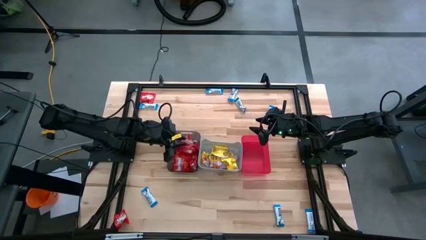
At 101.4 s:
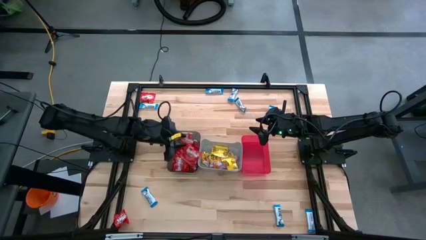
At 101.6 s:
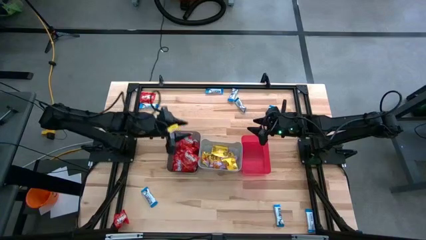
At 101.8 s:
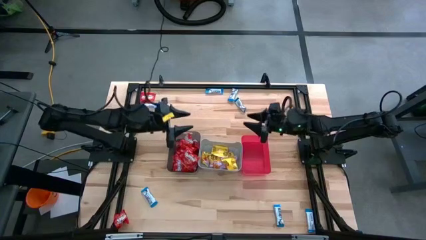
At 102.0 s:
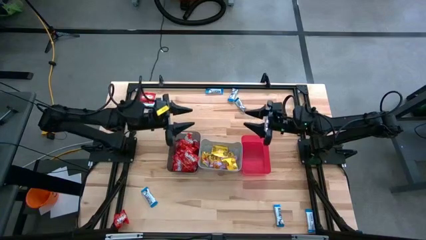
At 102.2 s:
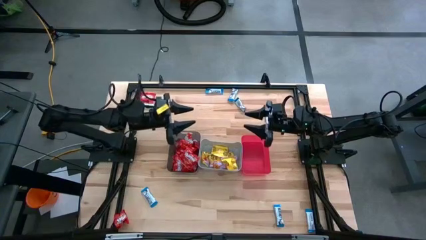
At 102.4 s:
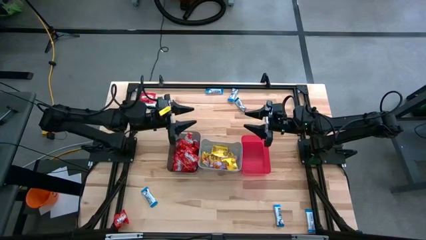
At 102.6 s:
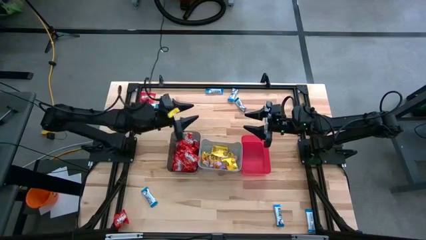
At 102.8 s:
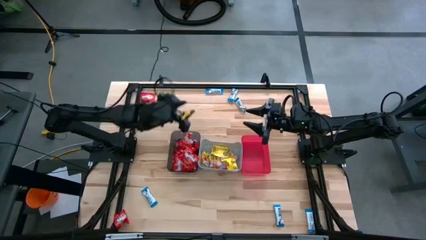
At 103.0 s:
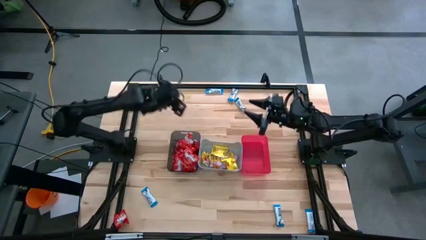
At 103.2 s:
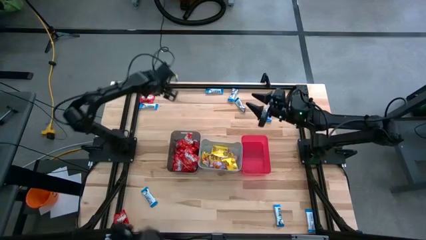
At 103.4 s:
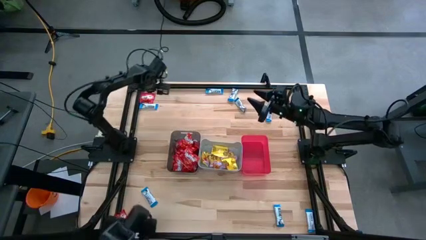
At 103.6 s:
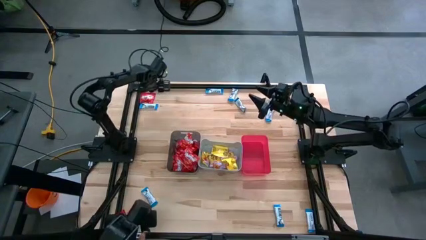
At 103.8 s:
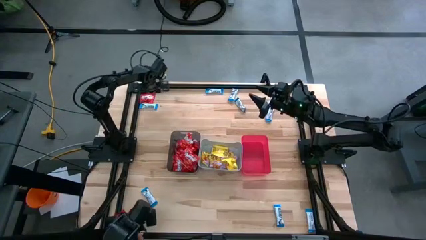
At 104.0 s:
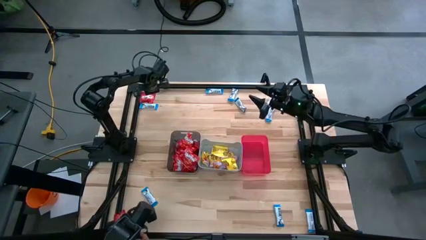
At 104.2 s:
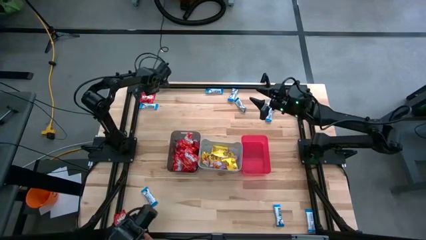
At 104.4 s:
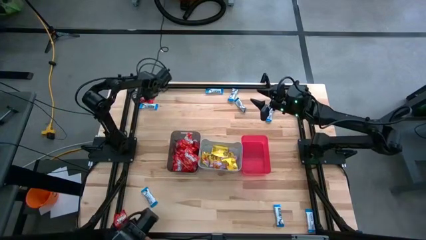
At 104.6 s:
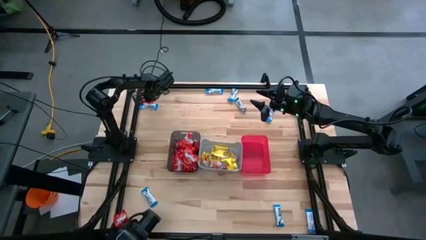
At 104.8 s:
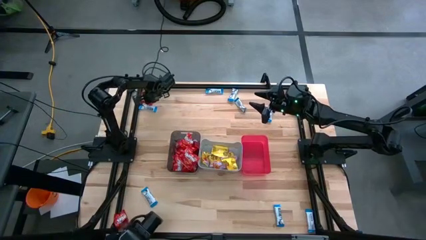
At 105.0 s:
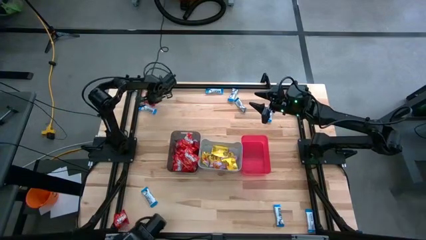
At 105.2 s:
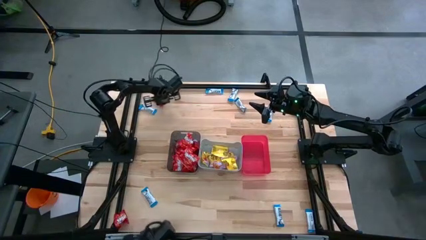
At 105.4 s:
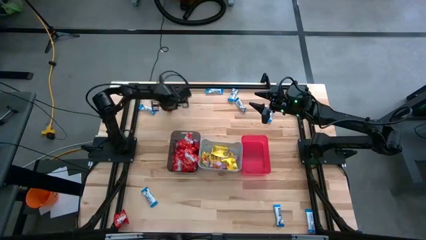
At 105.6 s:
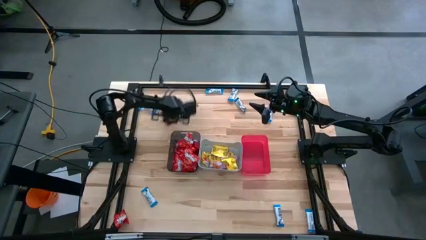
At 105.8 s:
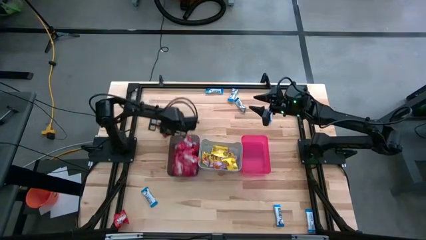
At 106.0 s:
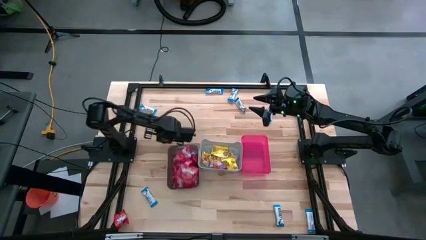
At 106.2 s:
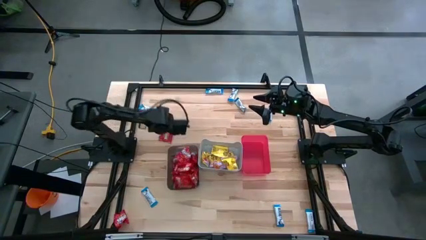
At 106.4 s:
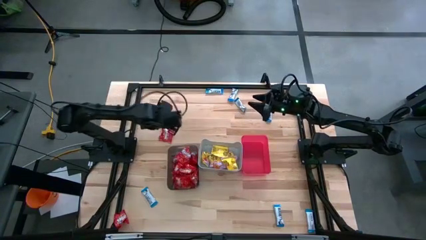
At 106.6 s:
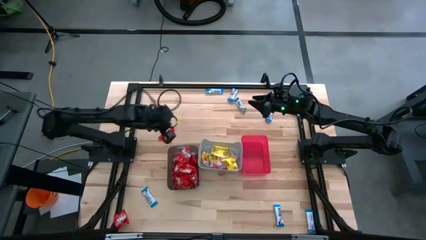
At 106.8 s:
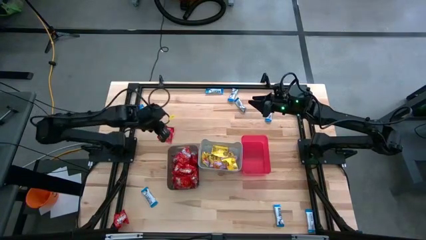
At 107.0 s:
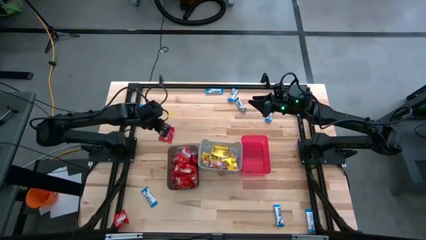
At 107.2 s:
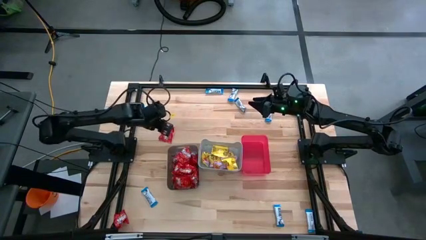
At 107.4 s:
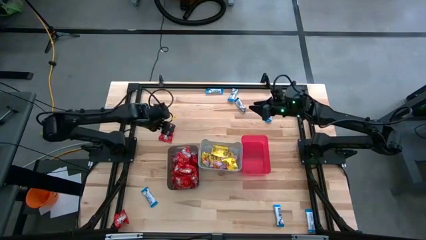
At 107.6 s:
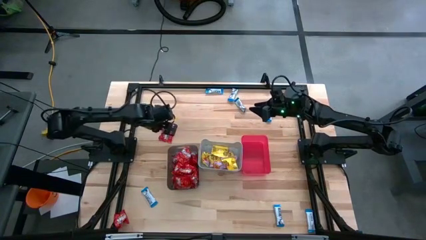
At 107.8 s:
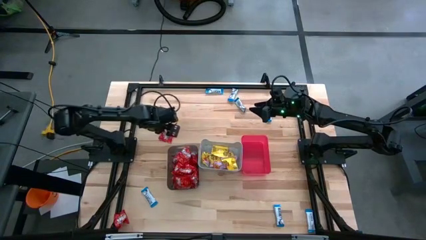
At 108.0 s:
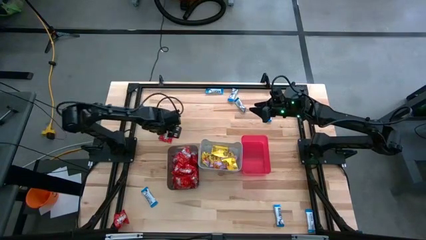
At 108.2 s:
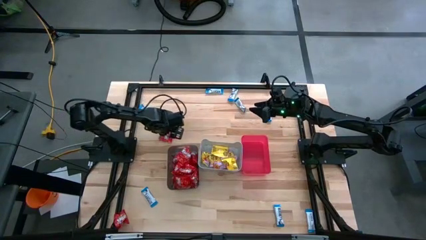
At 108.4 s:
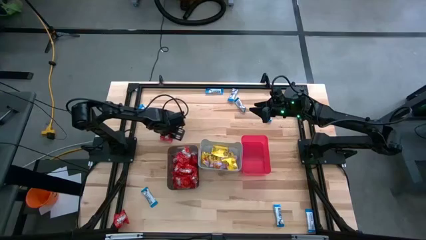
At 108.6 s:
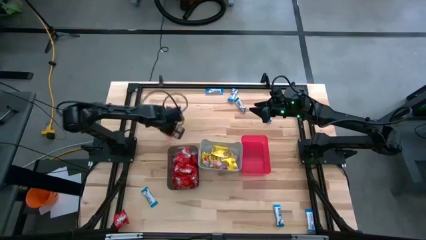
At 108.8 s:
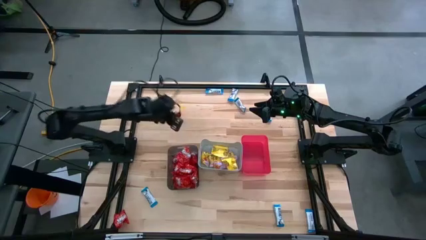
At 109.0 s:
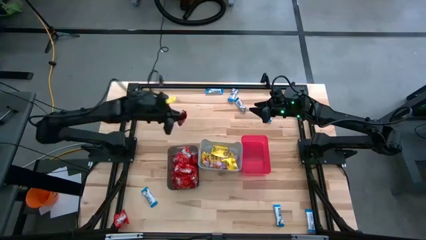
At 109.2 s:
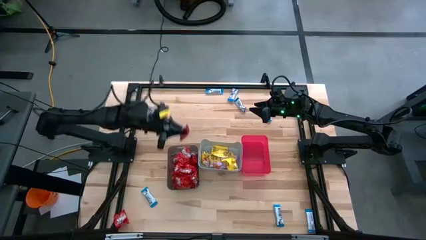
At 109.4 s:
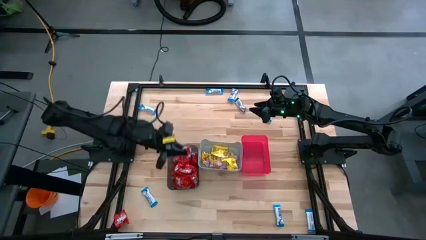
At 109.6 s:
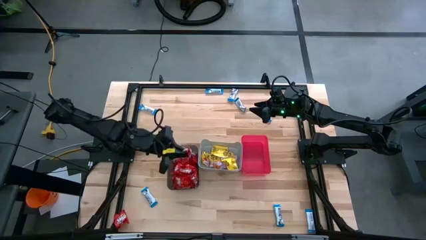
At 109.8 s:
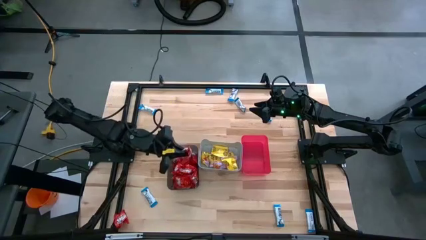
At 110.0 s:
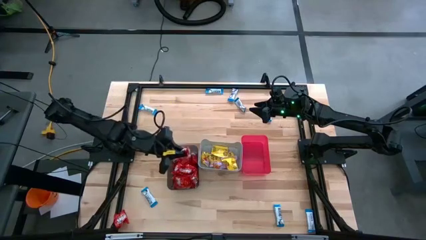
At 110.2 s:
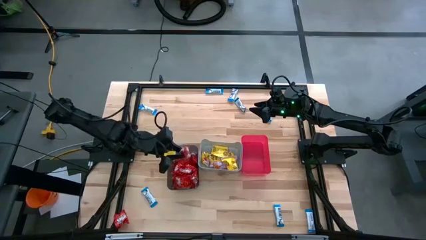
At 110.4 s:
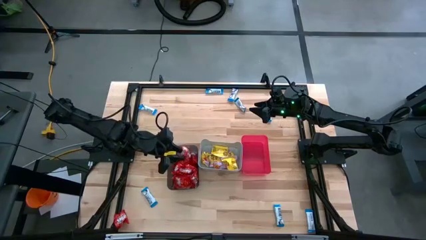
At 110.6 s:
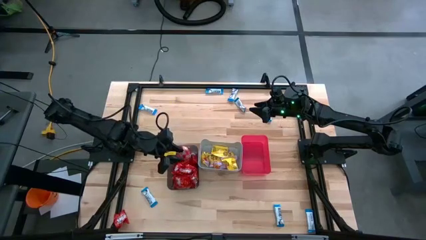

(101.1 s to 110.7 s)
Task: Sort candy
Put the red candy into the black bin

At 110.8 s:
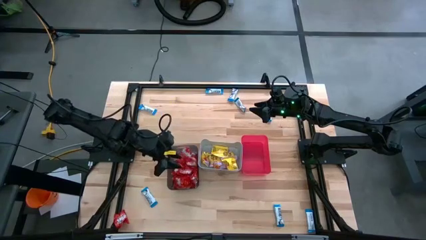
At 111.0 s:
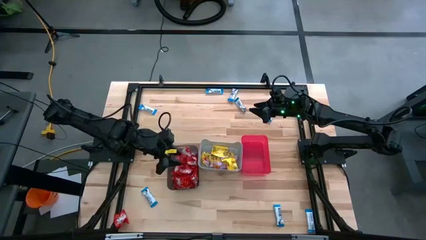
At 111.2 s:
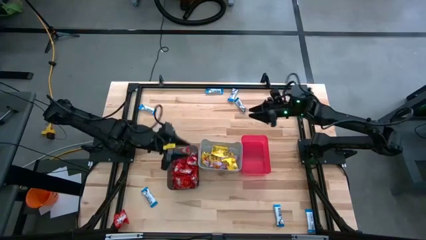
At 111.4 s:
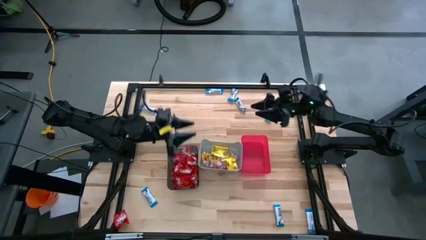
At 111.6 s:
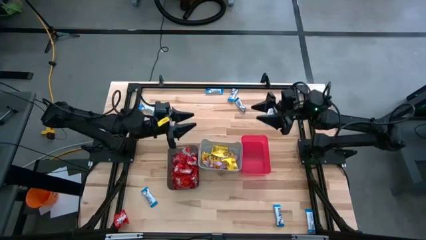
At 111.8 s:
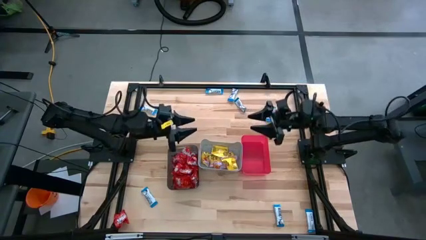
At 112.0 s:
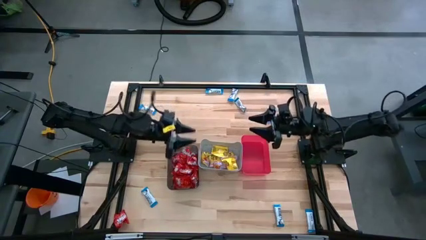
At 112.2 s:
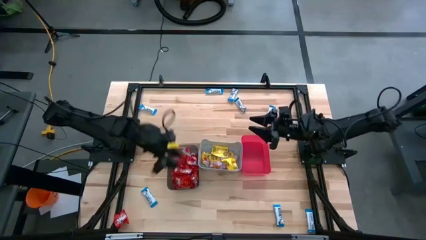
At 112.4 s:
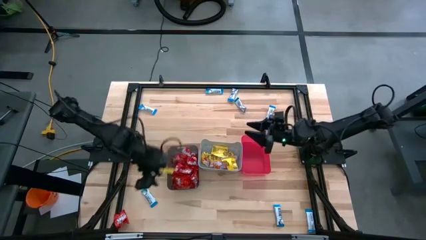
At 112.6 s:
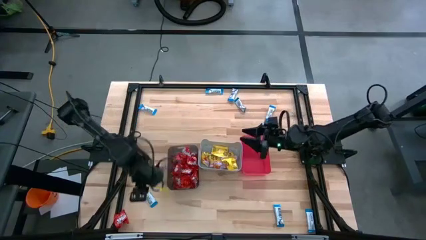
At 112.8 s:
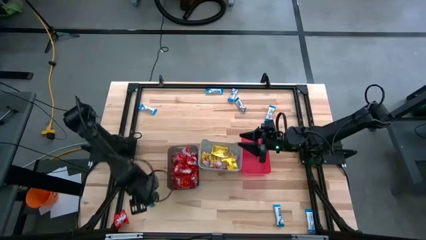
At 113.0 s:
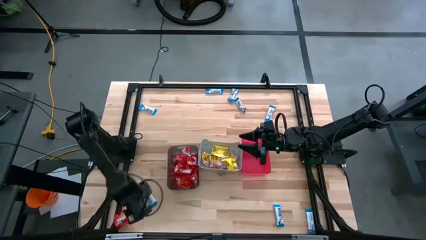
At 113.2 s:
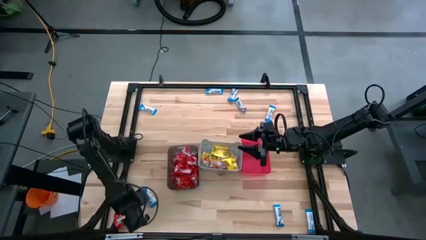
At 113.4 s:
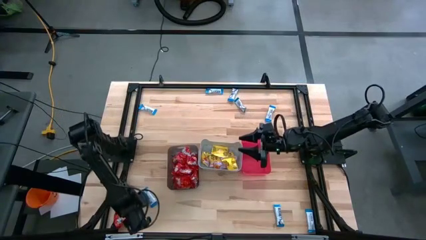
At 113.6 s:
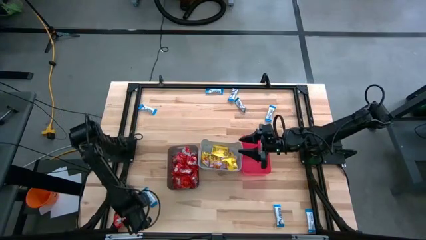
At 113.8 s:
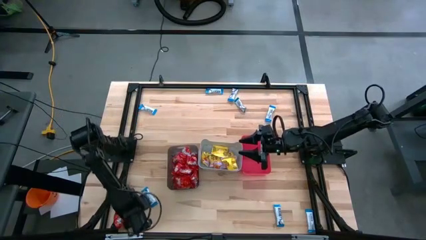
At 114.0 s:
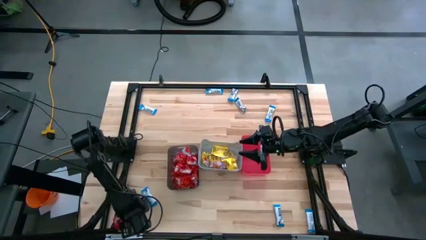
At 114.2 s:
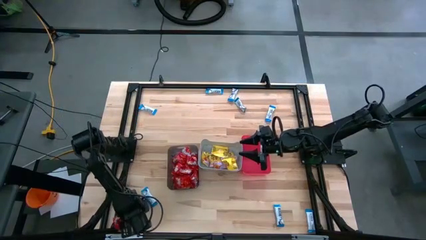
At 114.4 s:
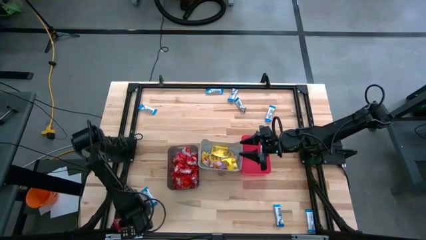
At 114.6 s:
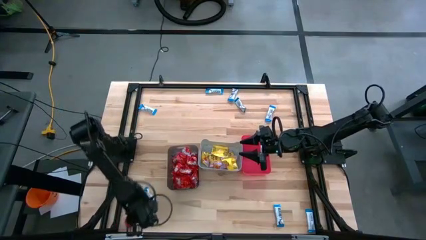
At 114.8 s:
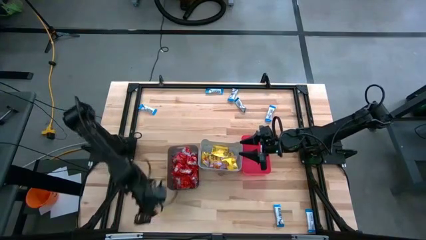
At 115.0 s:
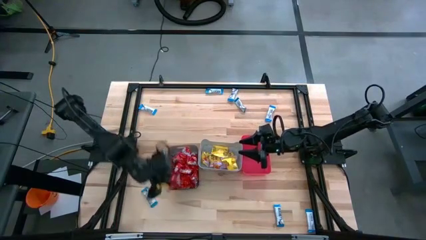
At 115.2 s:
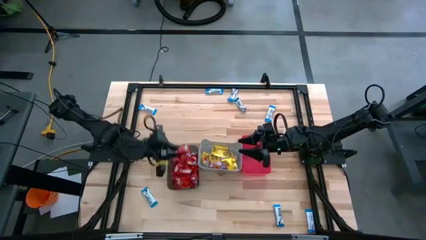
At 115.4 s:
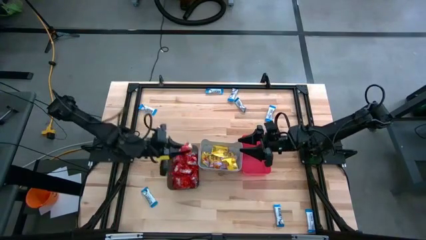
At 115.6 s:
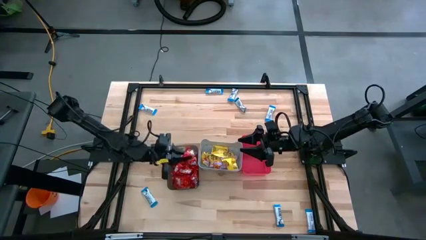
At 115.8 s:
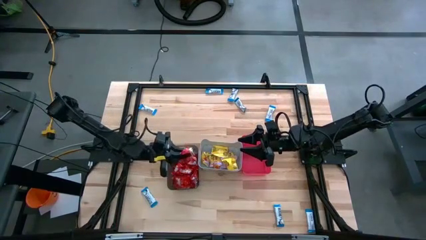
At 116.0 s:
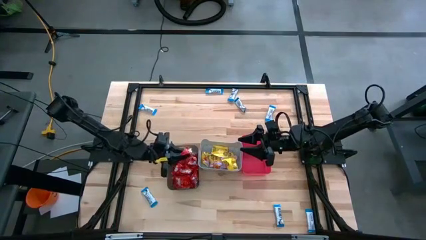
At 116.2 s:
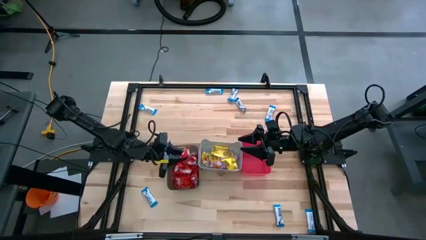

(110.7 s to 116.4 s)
Put the red candy into the black bin

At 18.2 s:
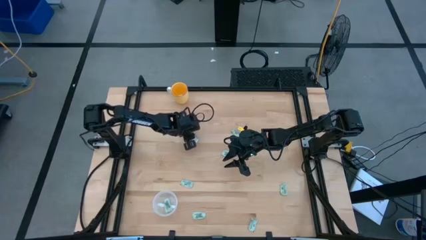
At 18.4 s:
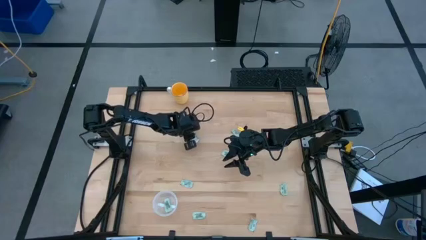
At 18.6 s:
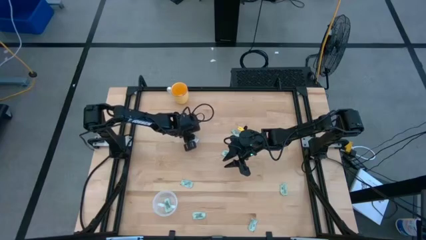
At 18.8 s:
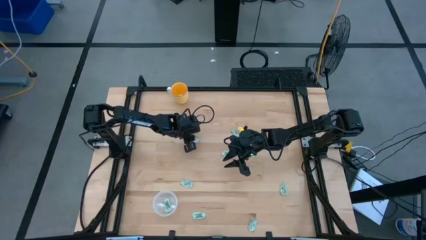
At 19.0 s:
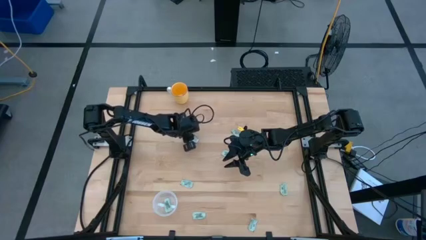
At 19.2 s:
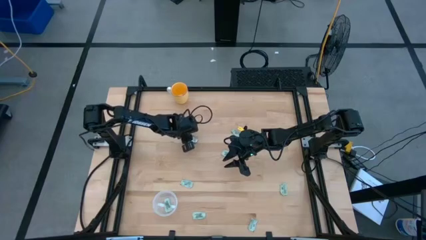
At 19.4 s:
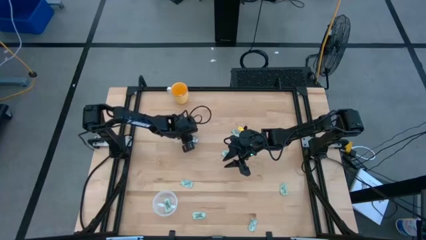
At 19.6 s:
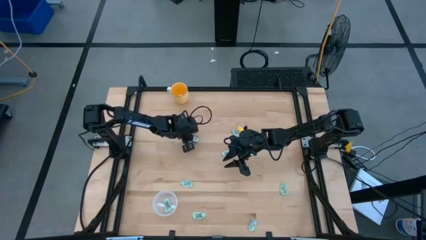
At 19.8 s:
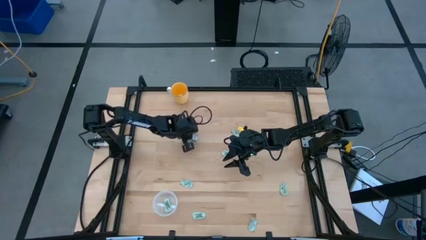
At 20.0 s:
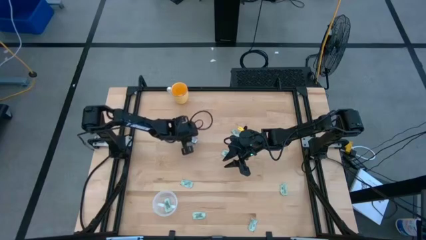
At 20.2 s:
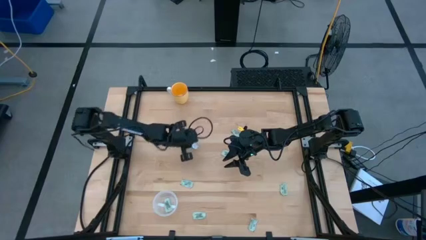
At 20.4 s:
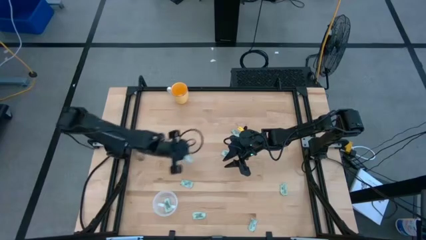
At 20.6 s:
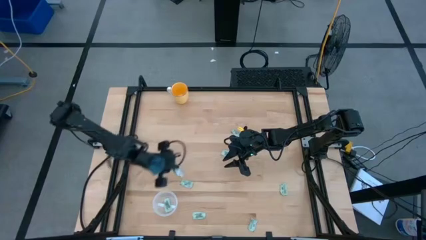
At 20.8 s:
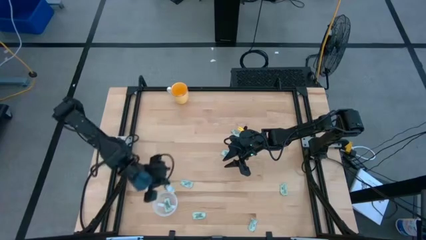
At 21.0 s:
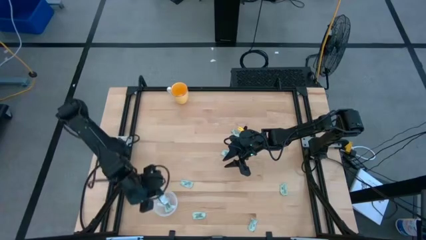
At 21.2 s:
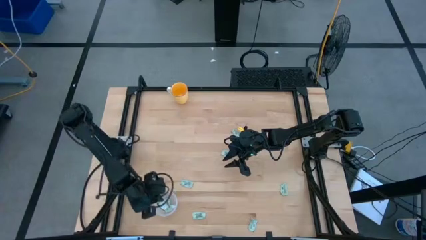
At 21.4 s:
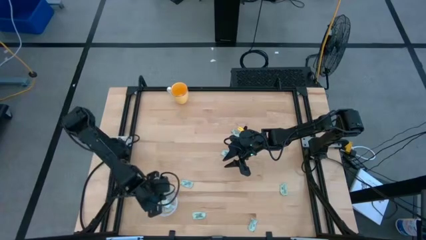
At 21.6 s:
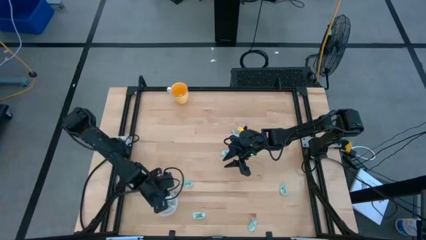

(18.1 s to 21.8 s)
Task: Pick and place Stevia / Truvia into bins
Put the stevia packet into the transparent container
